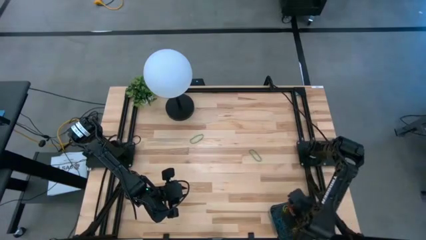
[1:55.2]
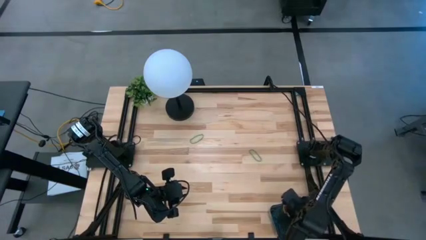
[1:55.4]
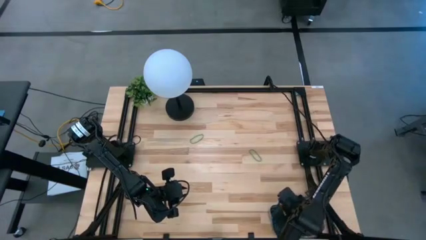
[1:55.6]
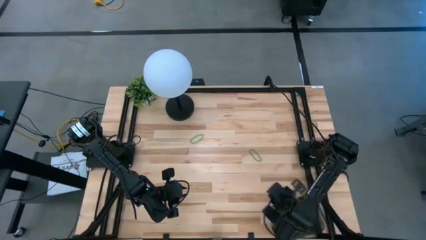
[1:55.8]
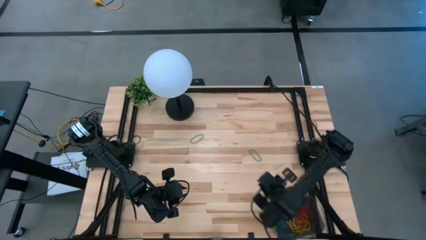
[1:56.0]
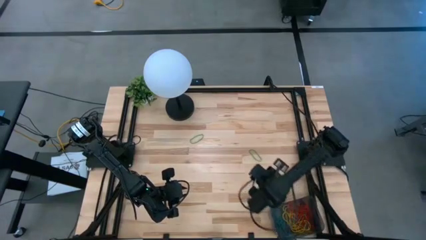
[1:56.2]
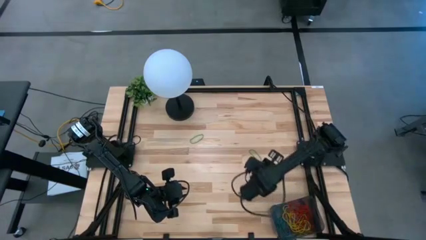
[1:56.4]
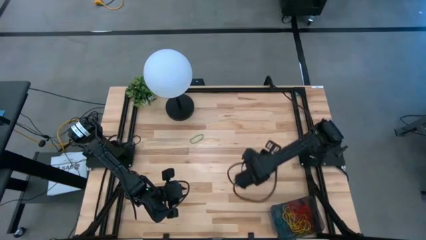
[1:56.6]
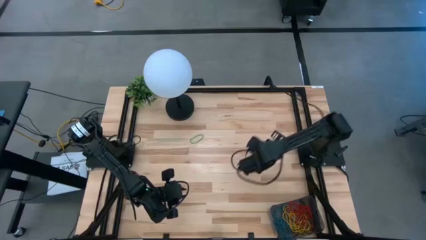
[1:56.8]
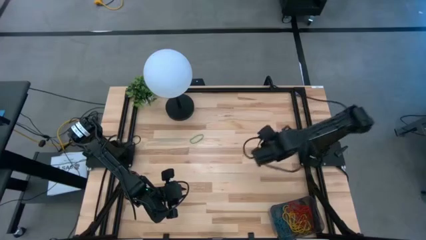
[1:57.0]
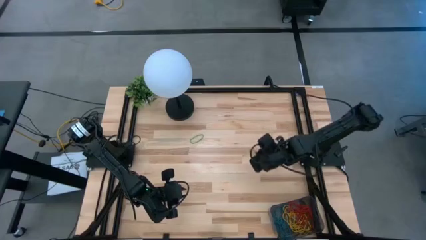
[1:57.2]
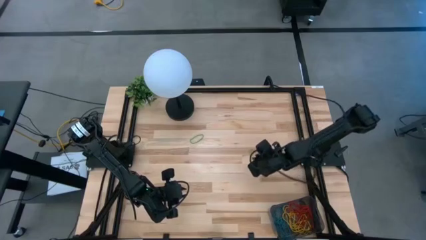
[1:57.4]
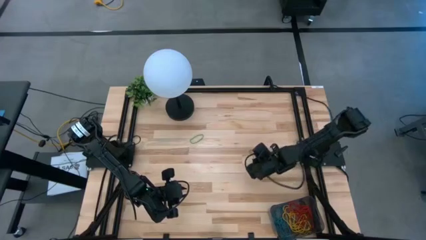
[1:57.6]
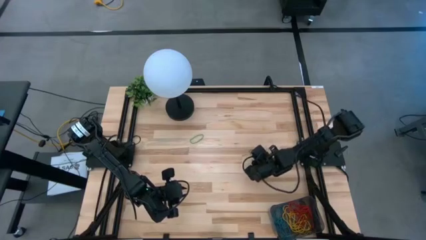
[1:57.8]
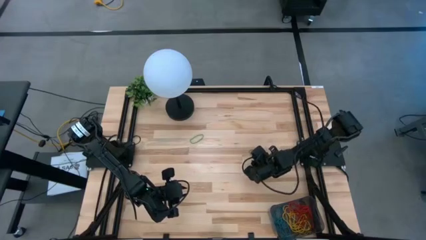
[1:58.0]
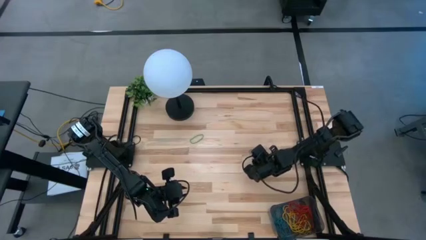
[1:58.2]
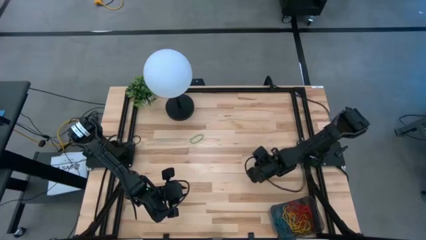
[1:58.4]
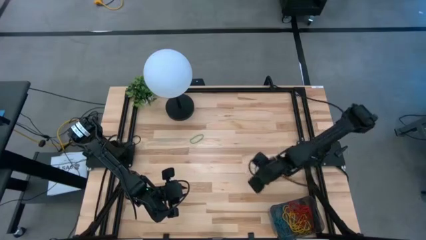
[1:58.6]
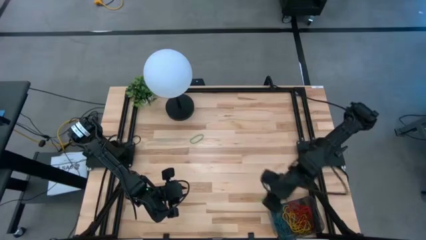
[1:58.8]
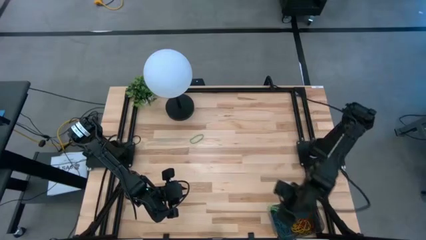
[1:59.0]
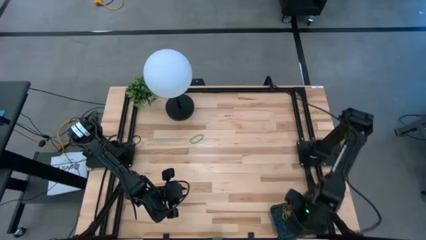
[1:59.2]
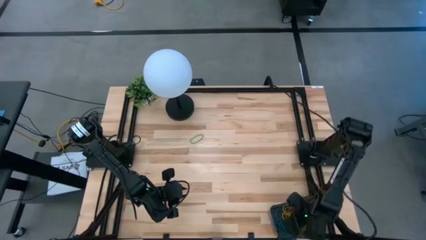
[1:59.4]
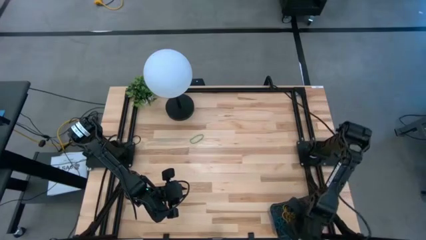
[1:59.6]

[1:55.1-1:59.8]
Task: Pick and place items into bin
Put the green rubber band into the black bin

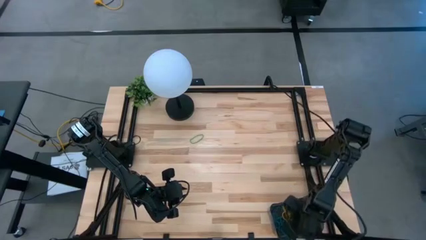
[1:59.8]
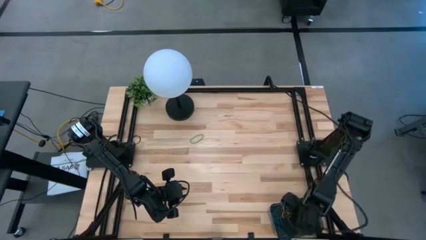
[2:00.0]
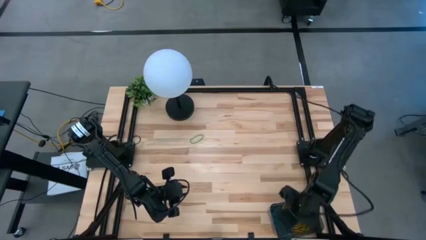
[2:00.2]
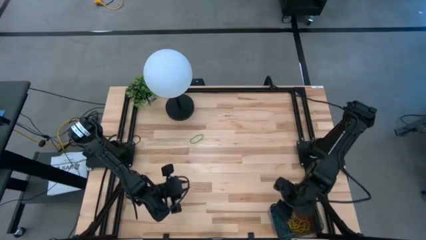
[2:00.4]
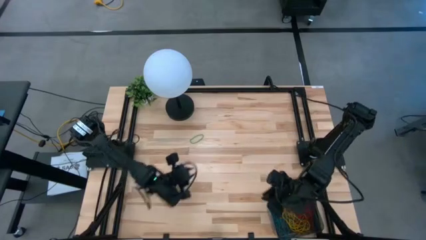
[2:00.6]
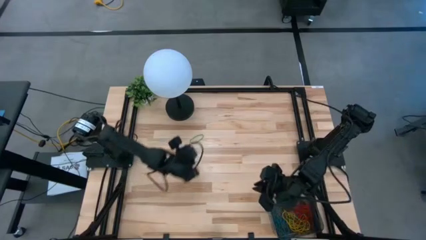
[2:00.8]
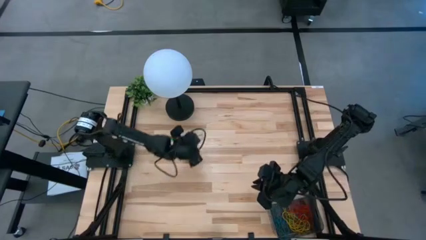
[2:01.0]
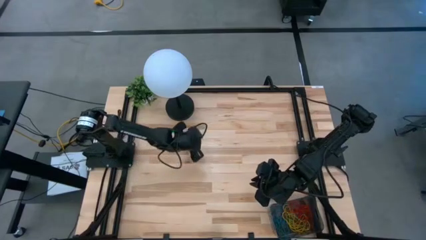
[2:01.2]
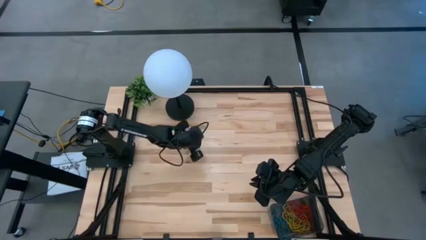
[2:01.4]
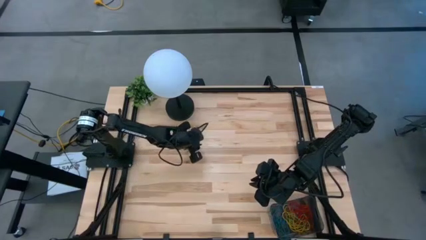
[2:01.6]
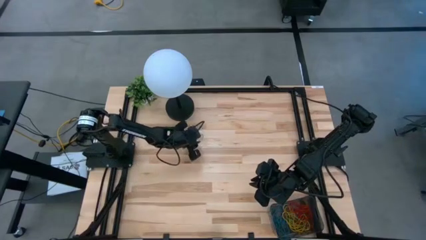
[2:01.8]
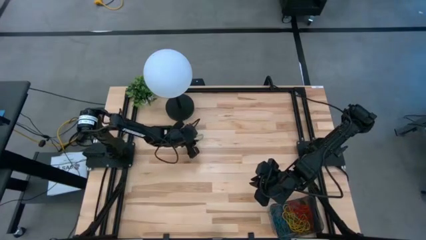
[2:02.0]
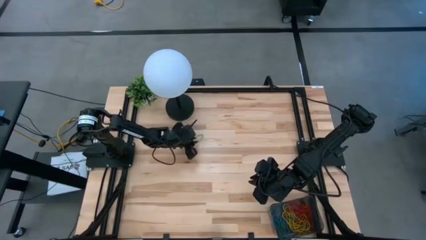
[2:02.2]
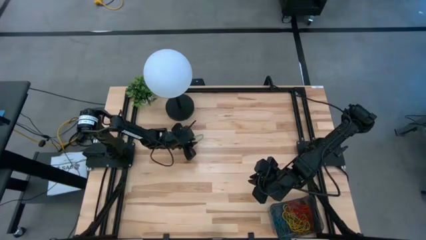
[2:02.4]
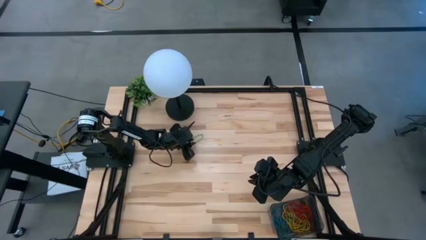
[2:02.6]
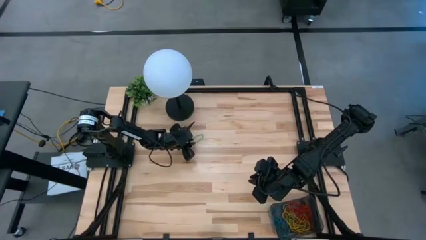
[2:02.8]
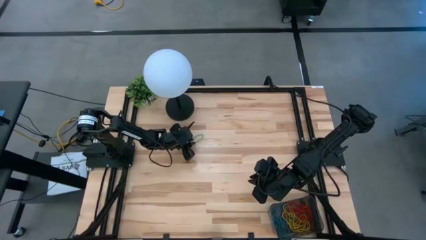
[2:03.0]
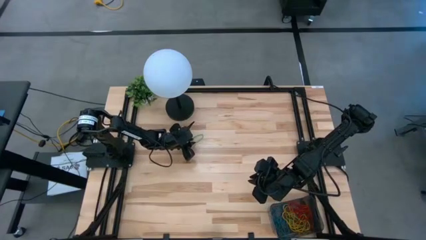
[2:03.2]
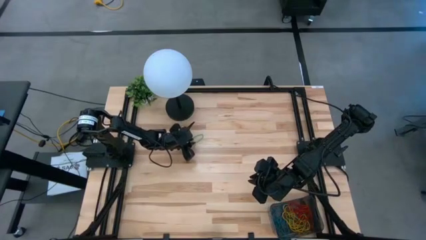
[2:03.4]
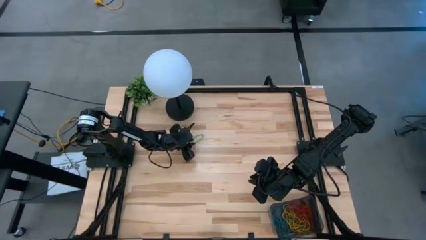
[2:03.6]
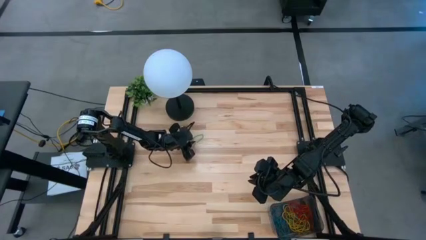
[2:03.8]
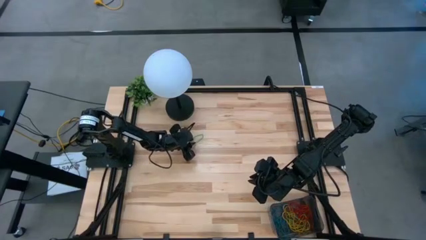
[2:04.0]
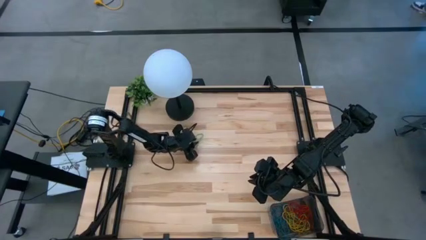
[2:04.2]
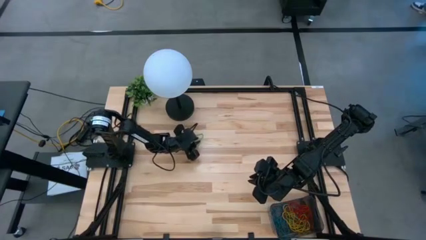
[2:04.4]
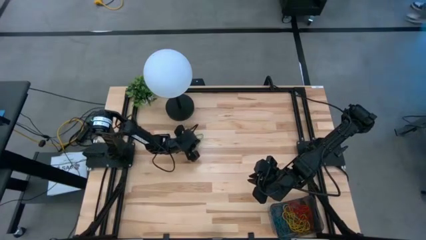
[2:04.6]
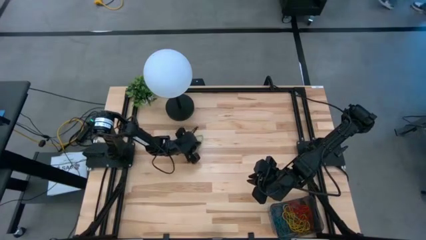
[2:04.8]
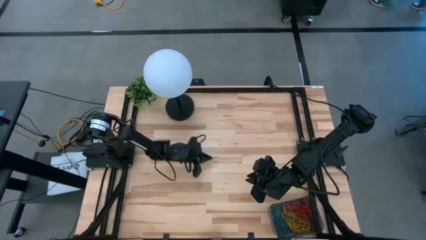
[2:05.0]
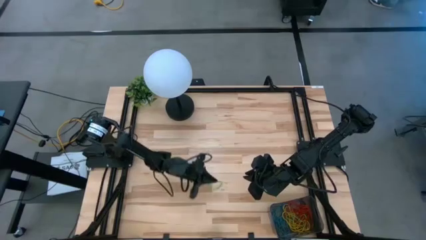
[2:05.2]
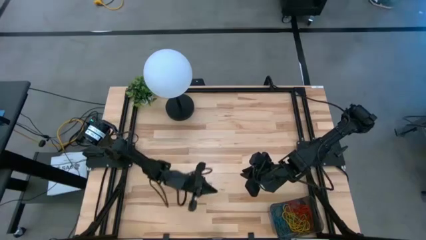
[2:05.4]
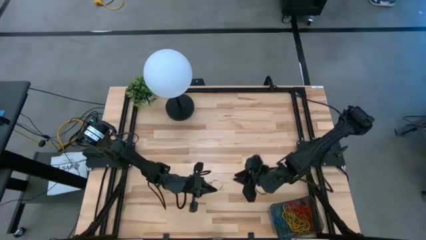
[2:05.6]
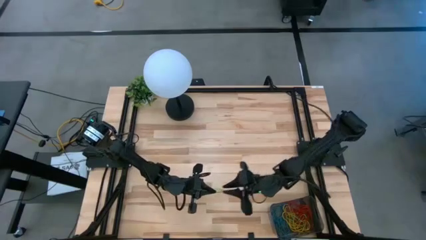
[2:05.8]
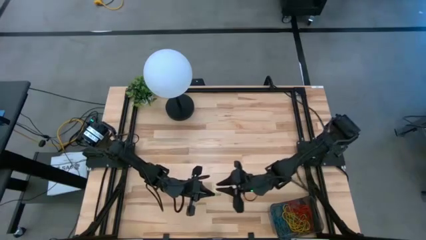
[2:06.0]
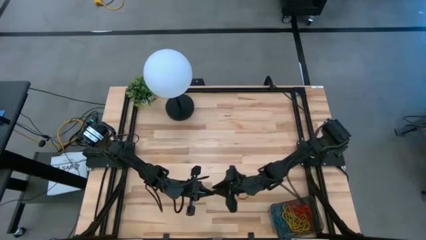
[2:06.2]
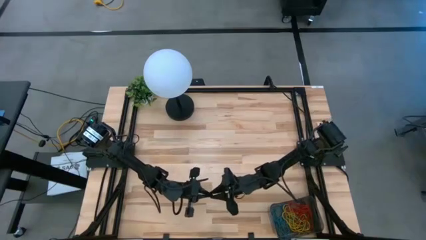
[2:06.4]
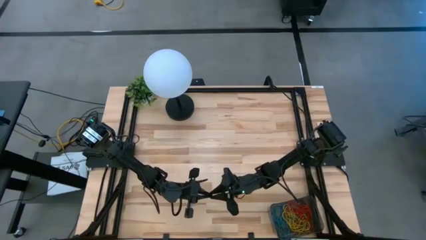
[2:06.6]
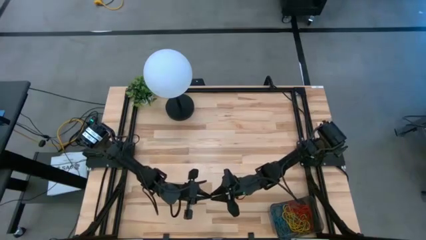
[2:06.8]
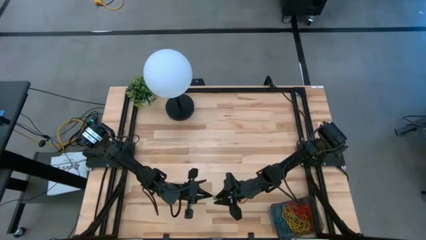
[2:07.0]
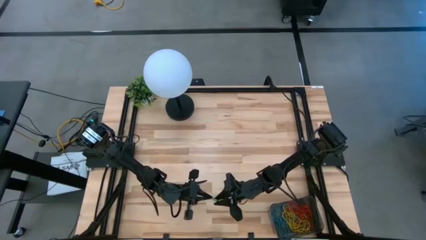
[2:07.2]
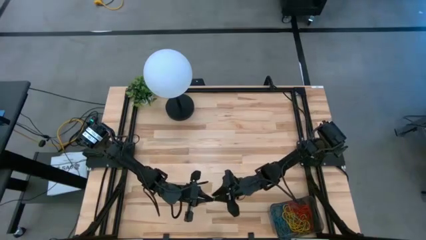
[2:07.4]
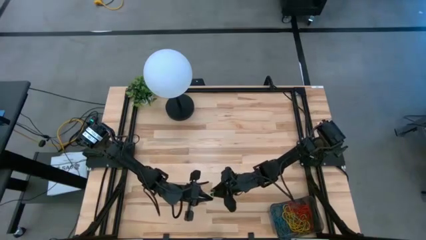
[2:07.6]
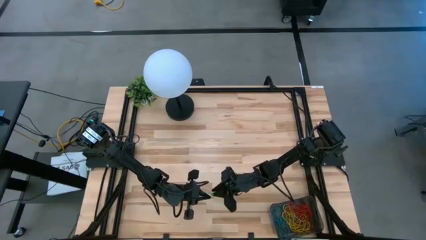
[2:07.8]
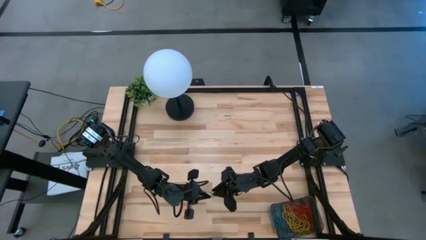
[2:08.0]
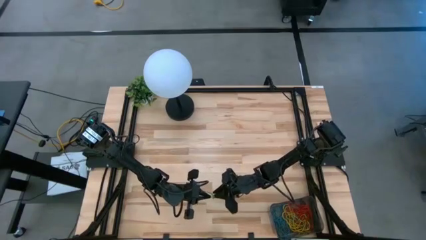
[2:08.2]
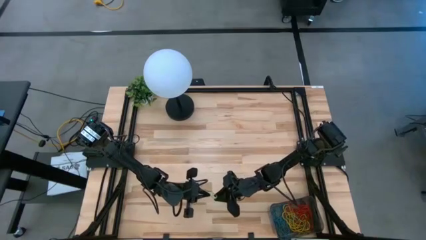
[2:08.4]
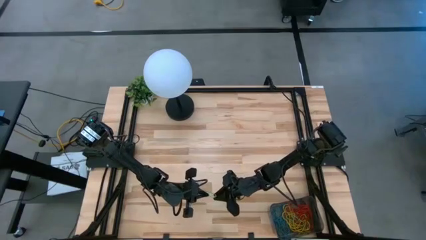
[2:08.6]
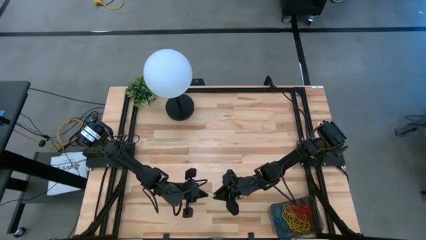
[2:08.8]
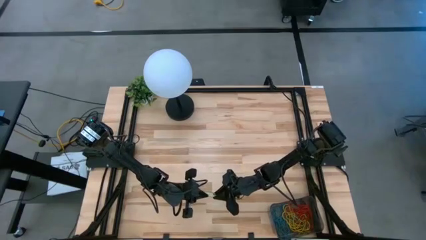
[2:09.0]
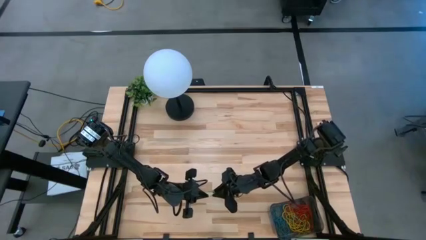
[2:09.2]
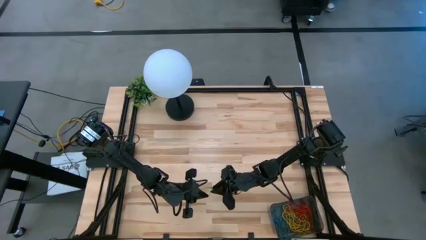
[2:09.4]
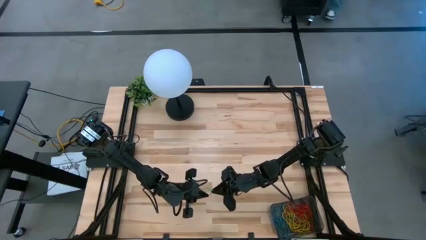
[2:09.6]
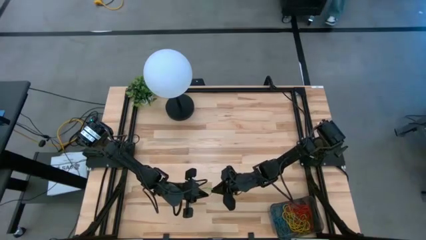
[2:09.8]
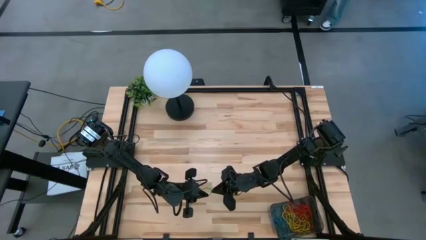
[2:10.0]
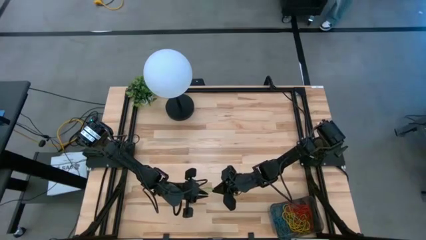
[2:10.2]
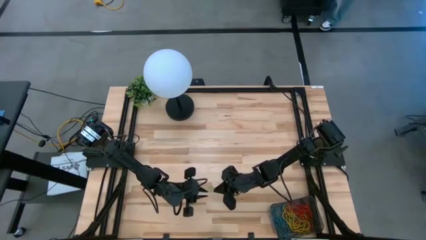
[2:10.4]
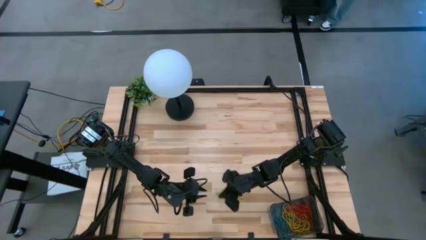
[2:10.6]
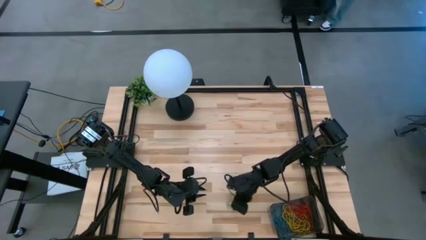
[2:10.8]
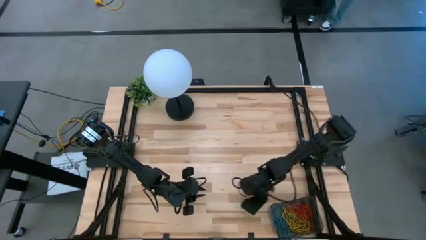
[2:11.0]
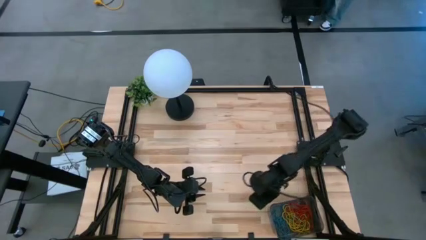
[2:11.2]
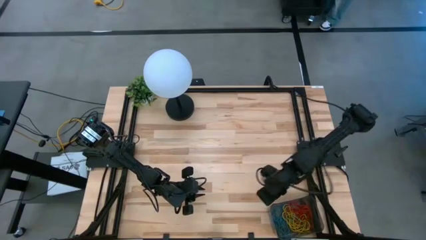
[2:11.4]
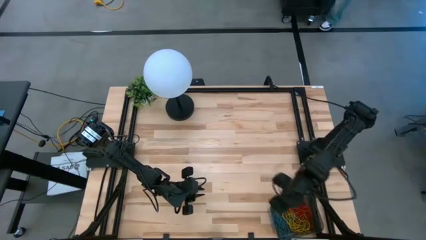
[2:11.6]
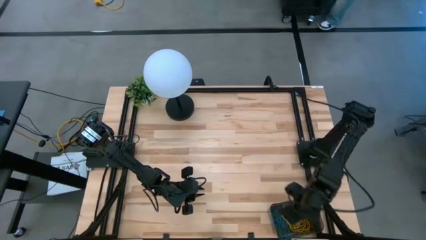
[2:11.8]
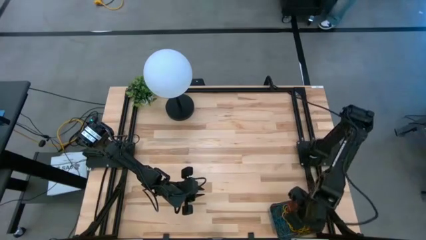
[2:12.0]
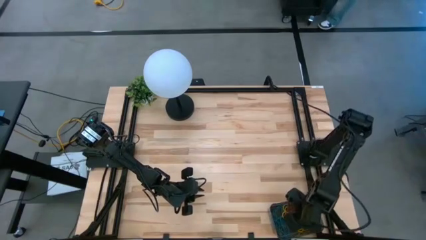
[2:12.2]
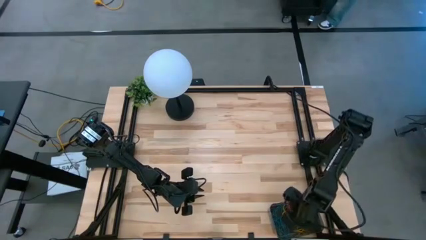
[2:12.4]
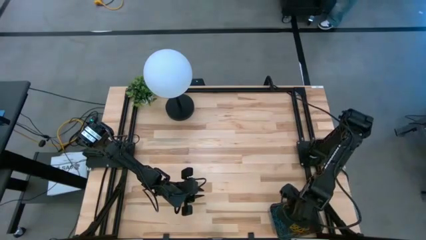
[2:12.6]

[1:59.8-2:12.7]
Put the green rubber band into the black bin
